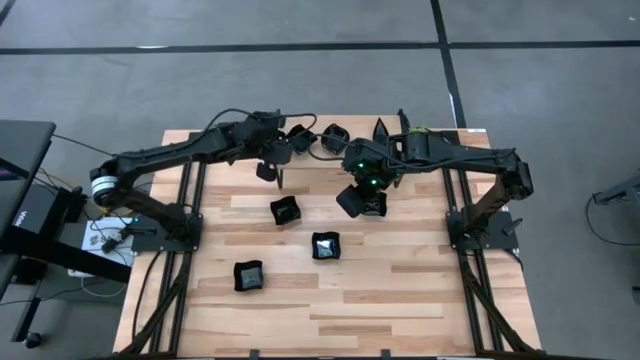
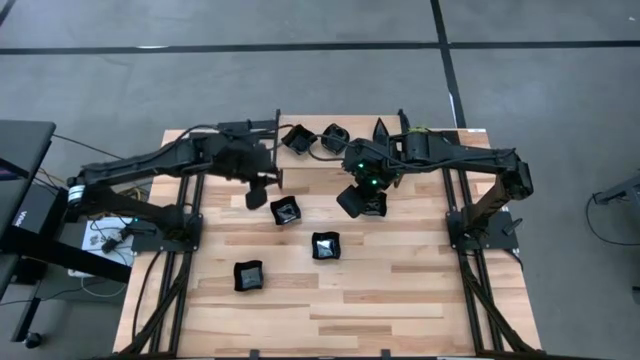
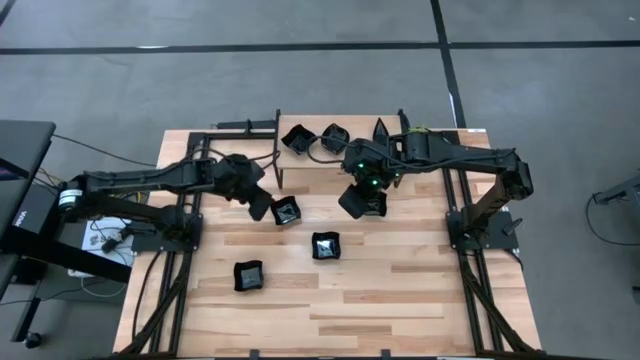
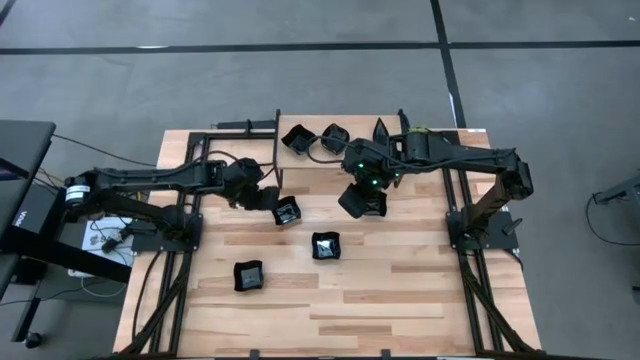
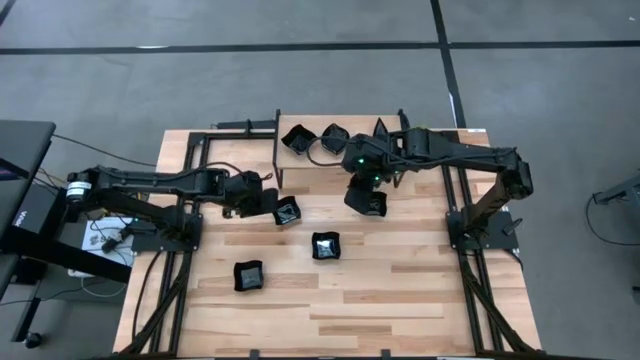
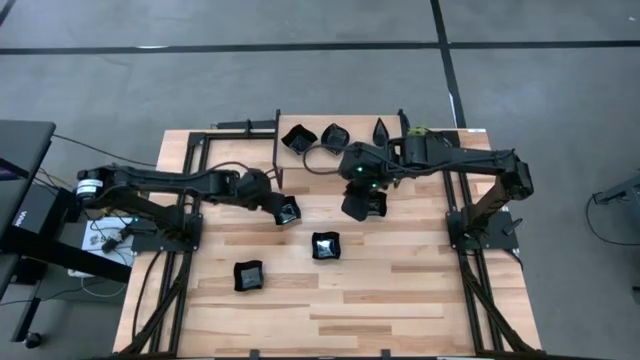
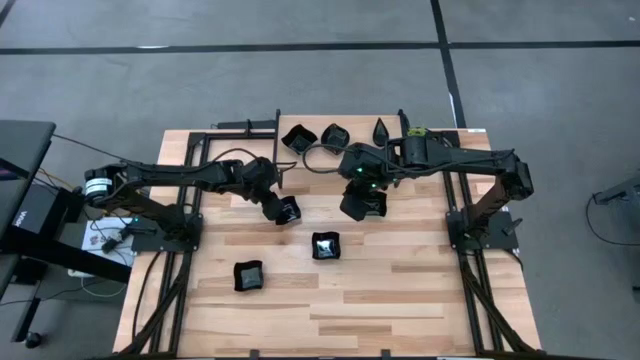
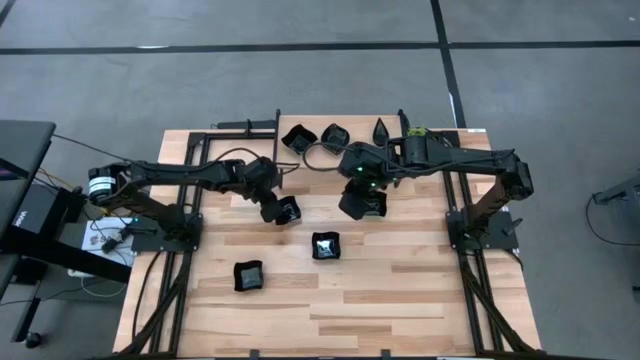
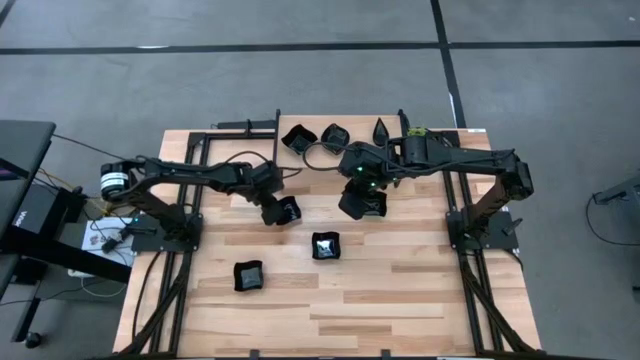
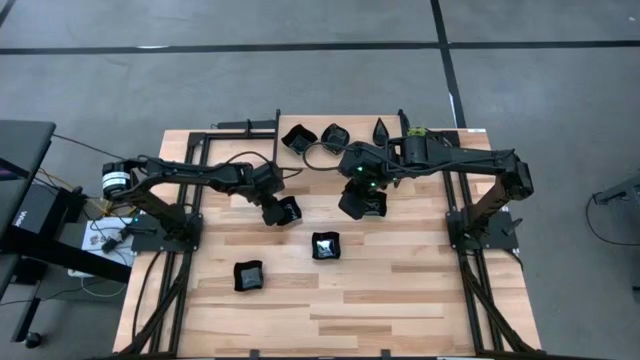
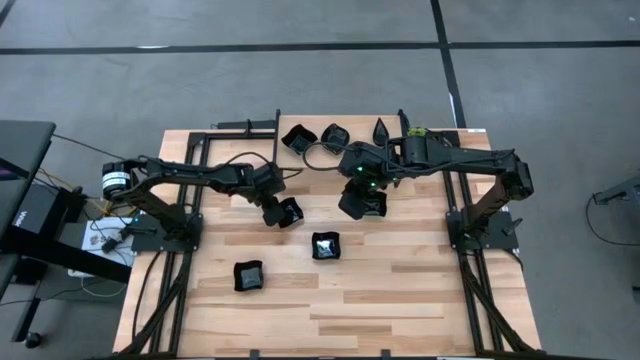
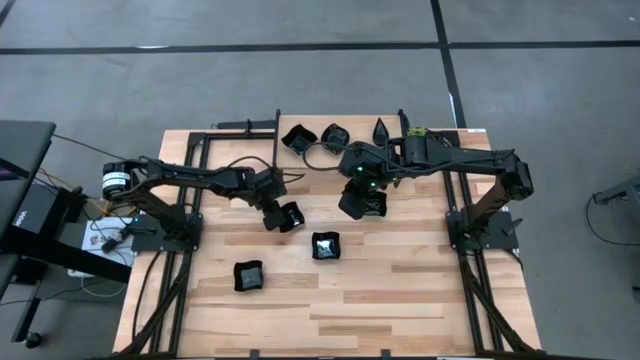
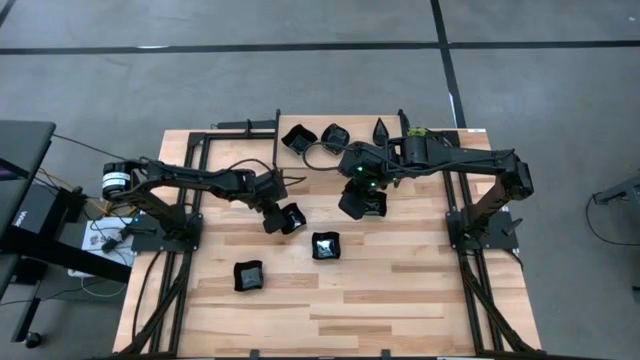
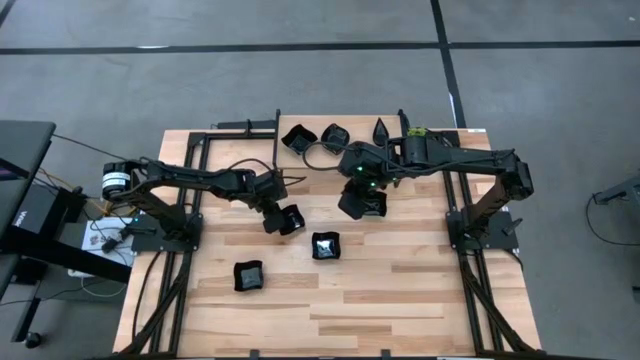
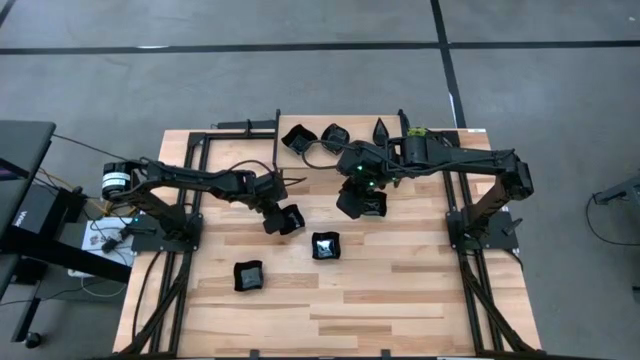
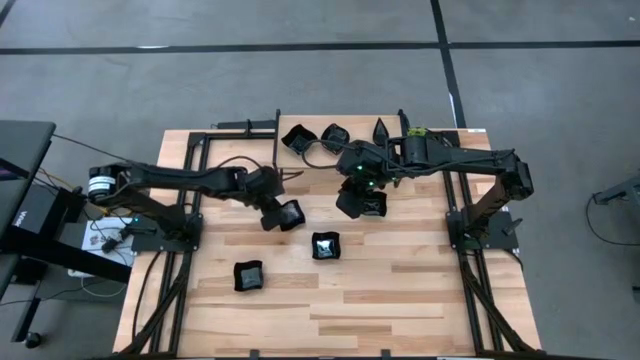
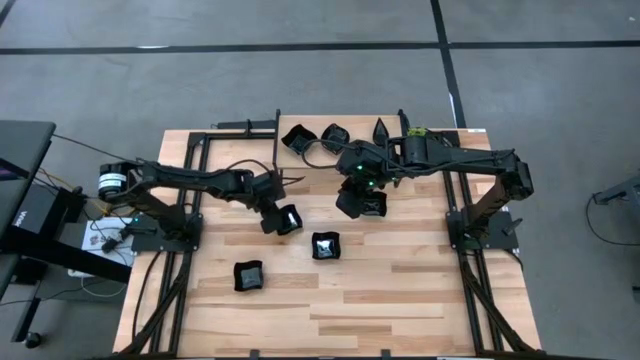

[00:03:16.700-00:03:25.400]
Task: Pick & Place Mini shaped plates
Stack the distorted square plate on top of the distorted square plate on the shelf

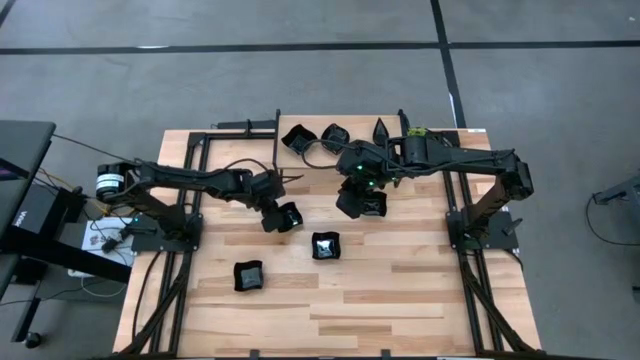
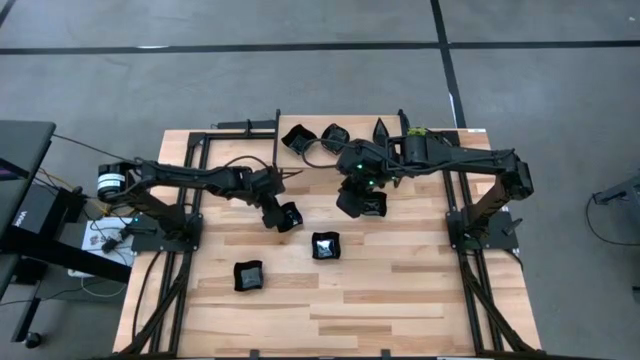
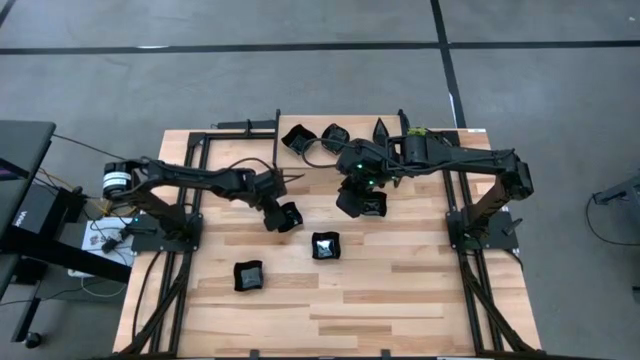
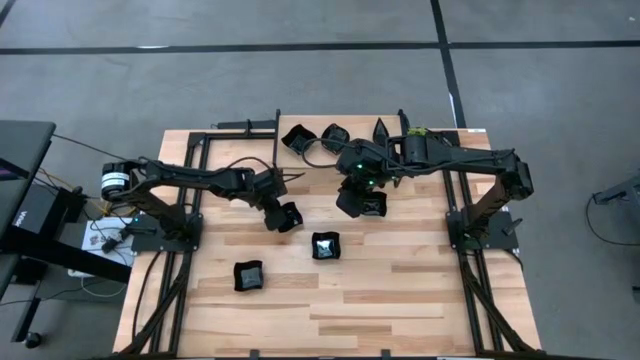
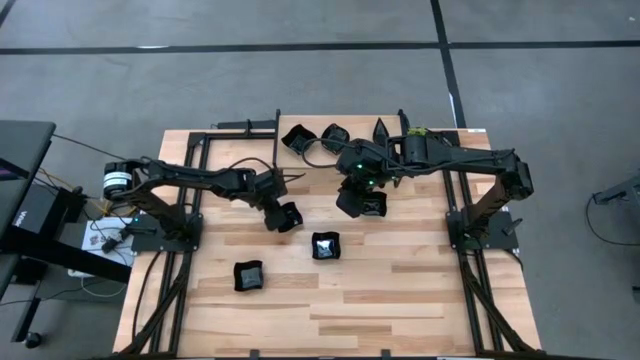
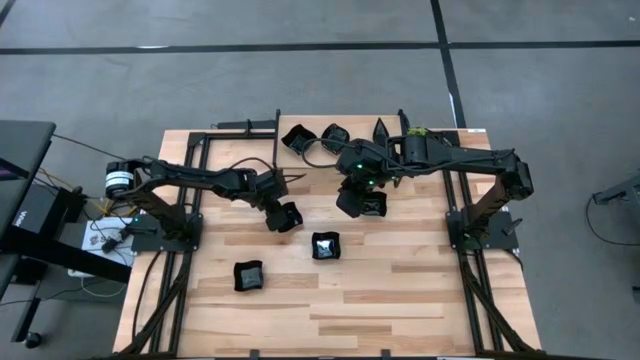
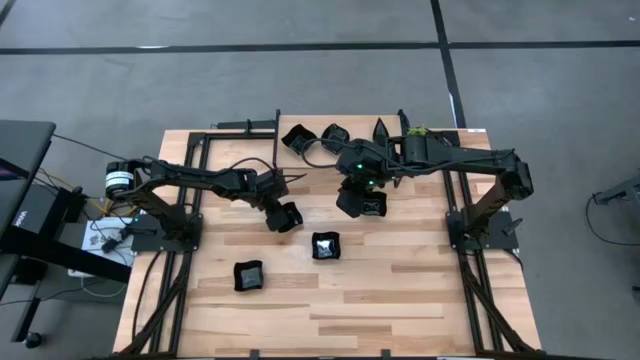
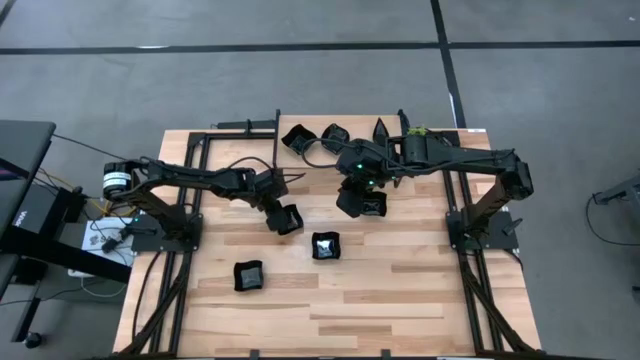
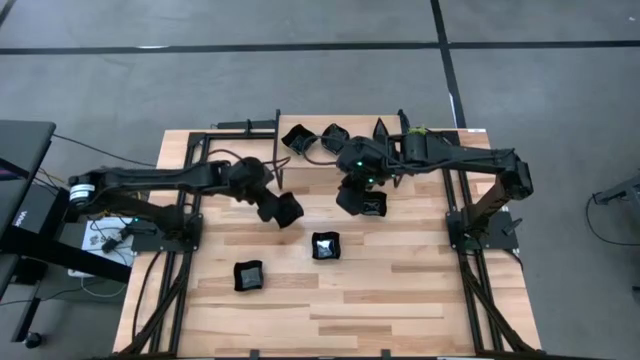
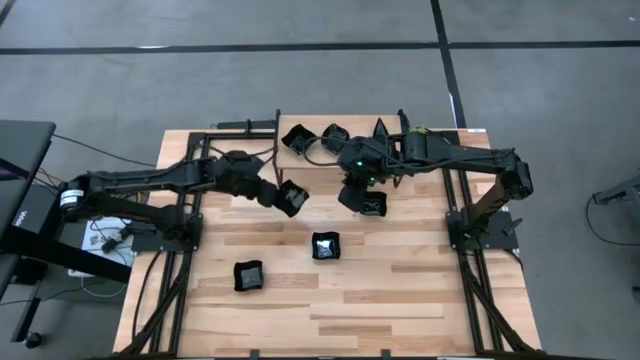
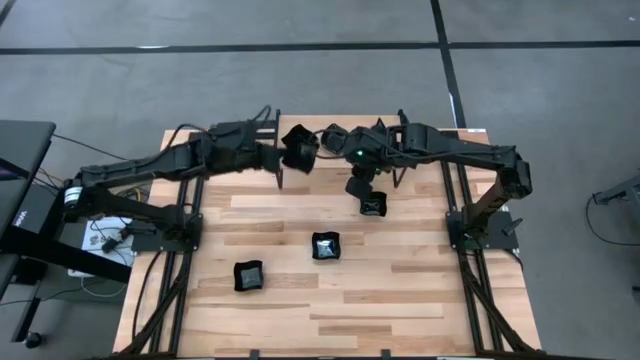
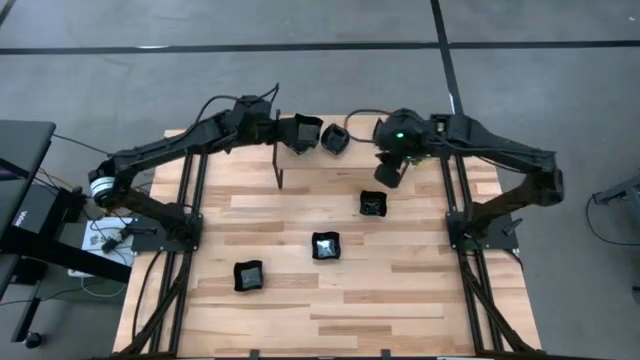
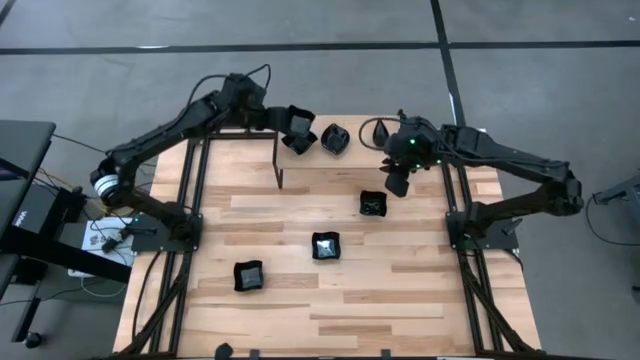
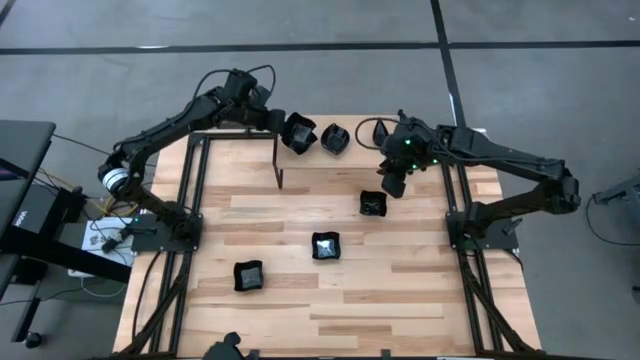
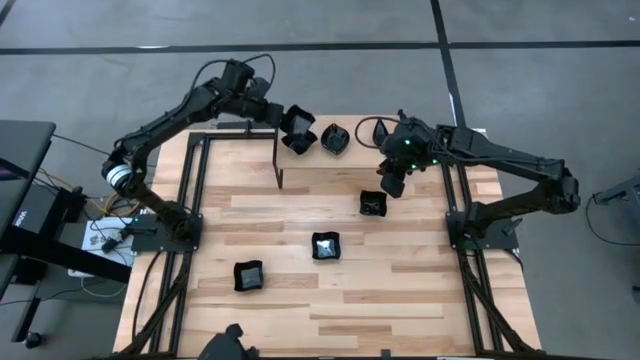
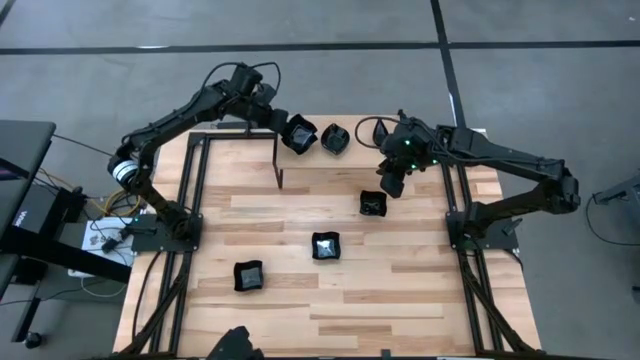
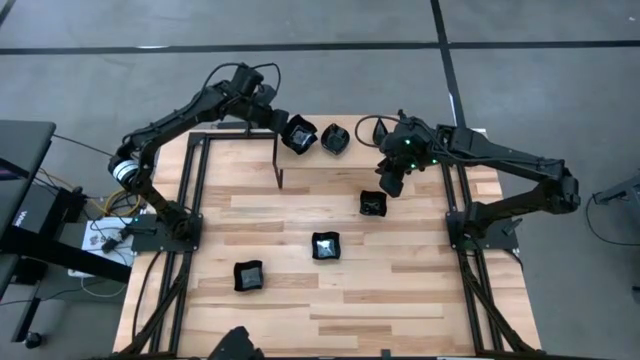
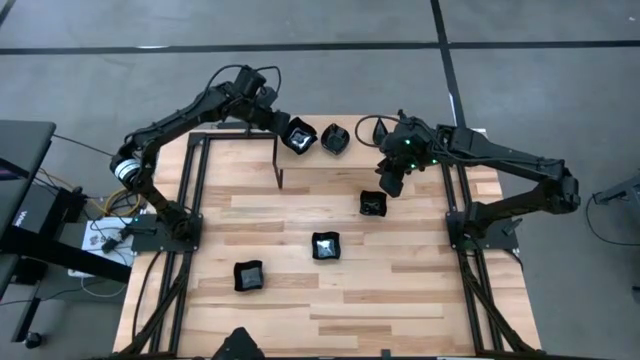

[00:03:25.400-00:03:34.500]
Stack the distorted square plate on top of the distorted square plate on the shelf

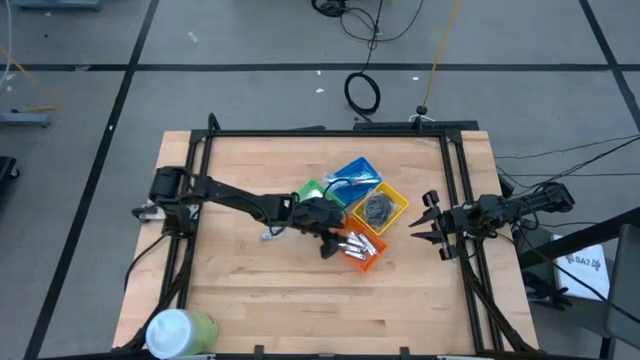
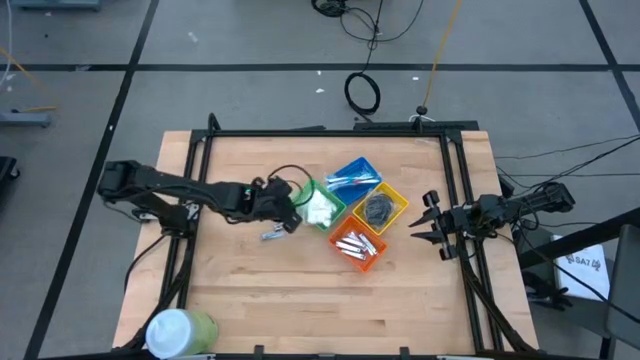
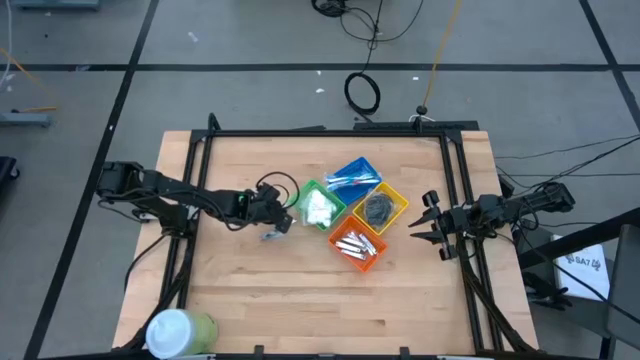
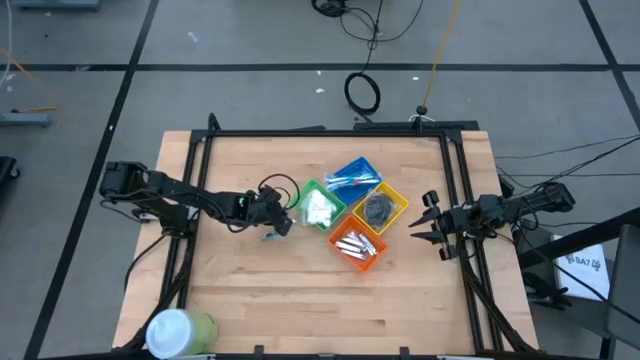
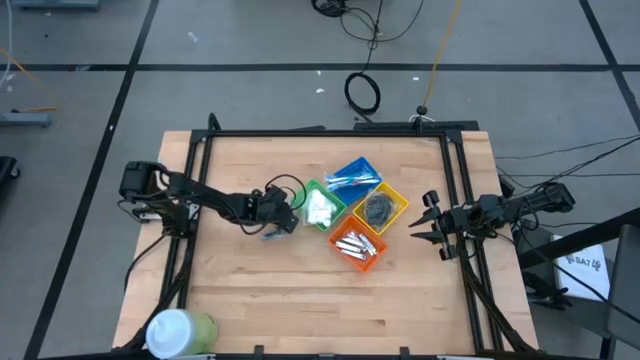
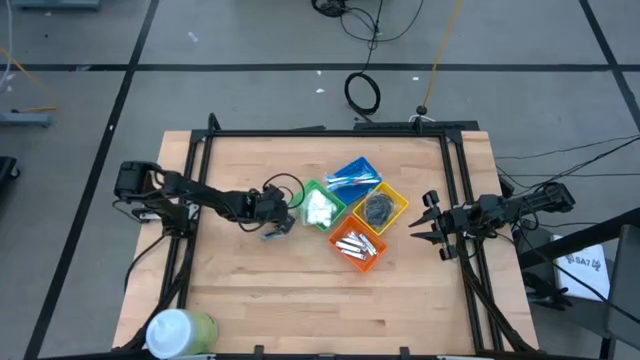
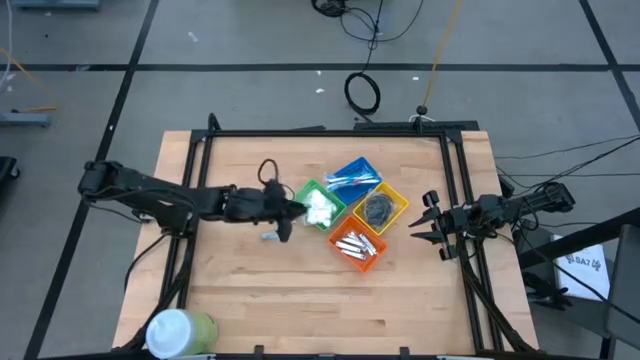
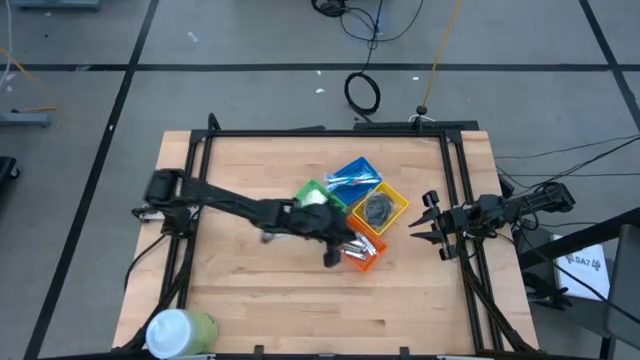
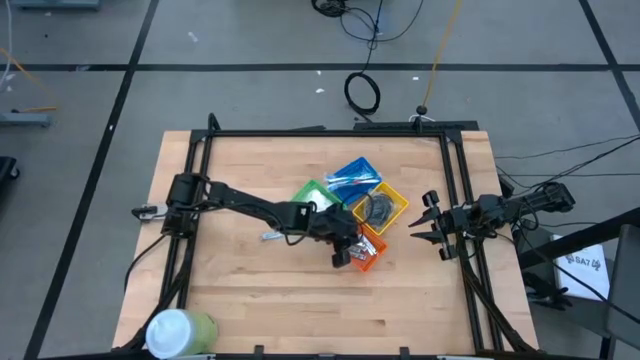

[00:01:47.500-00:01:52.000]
Task: Pick & Place Travel size toiletries
Put the silver nail cutter into the orange bin
